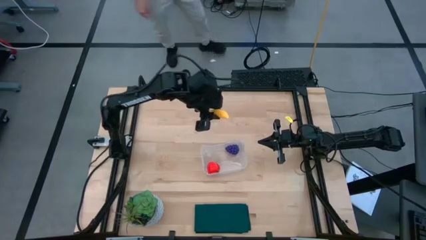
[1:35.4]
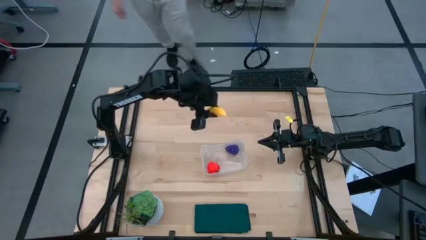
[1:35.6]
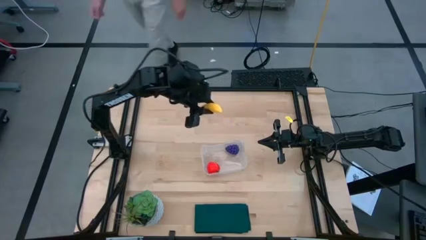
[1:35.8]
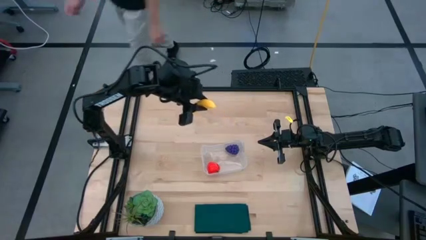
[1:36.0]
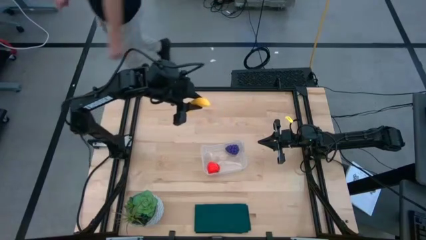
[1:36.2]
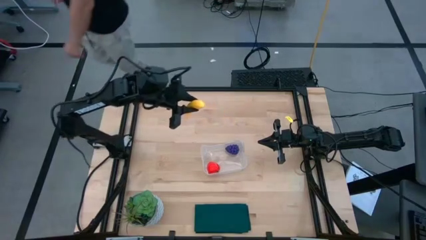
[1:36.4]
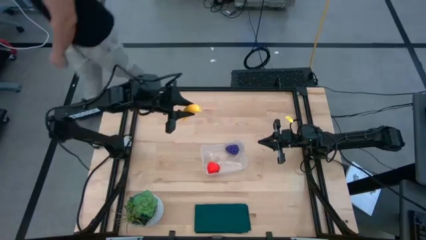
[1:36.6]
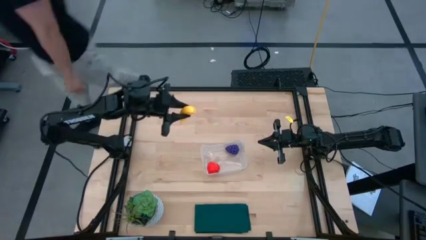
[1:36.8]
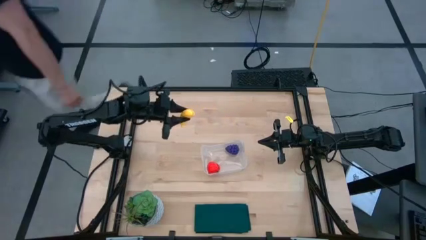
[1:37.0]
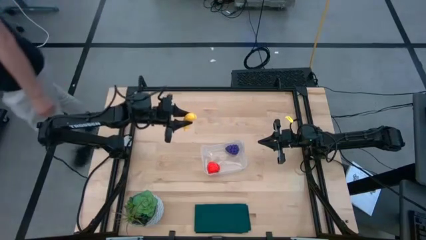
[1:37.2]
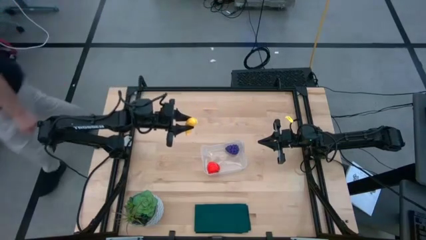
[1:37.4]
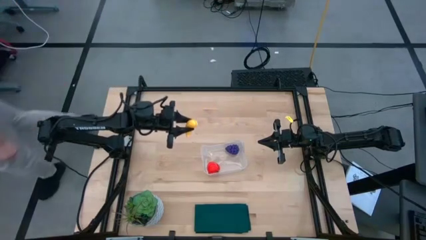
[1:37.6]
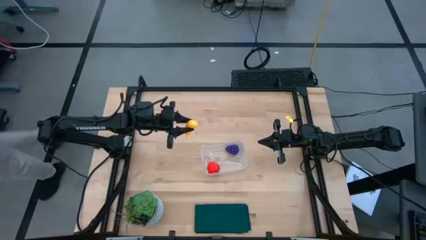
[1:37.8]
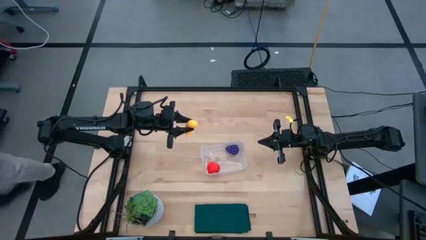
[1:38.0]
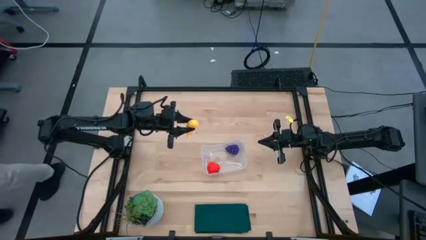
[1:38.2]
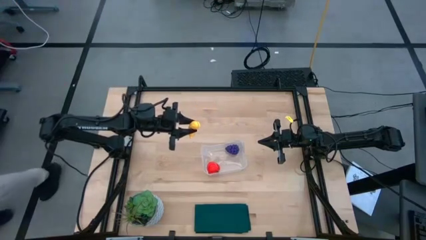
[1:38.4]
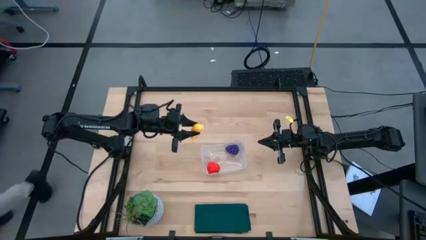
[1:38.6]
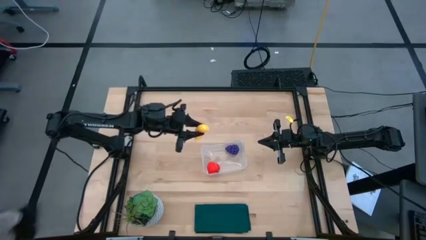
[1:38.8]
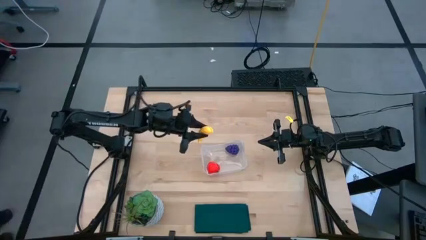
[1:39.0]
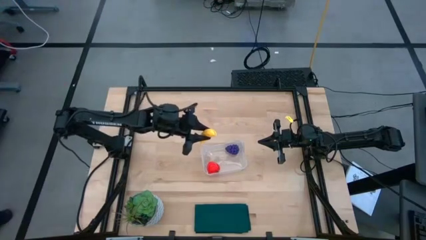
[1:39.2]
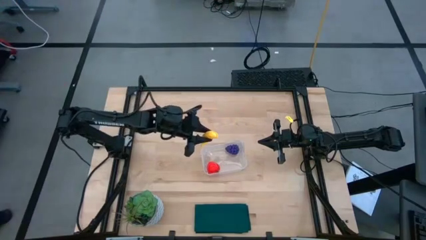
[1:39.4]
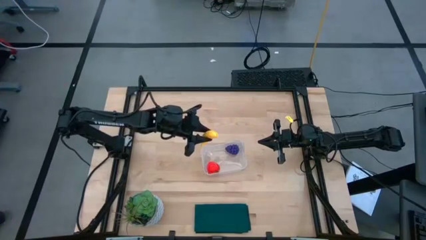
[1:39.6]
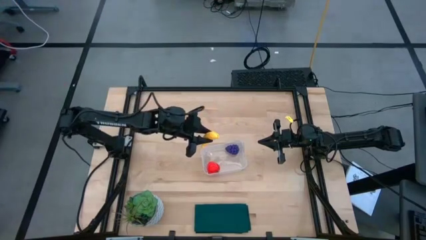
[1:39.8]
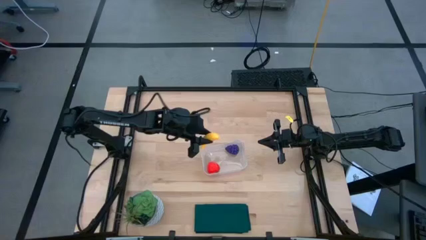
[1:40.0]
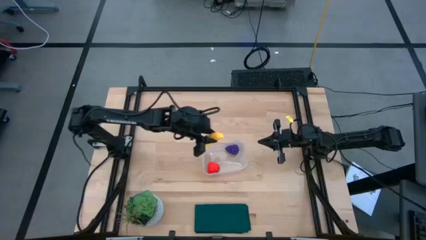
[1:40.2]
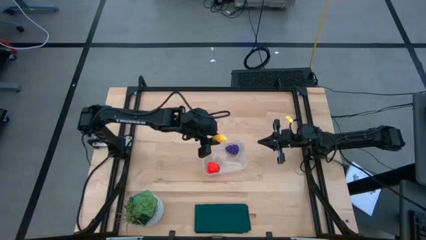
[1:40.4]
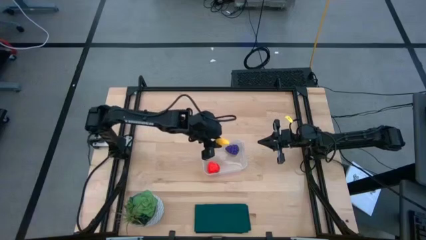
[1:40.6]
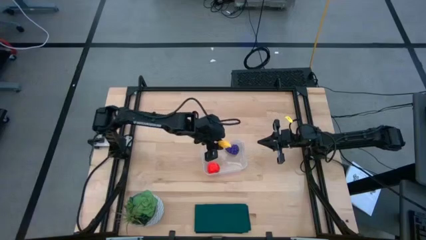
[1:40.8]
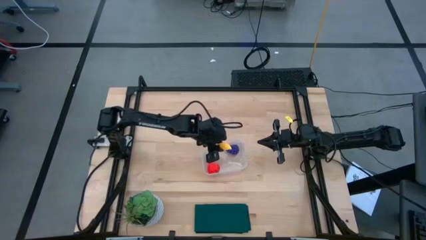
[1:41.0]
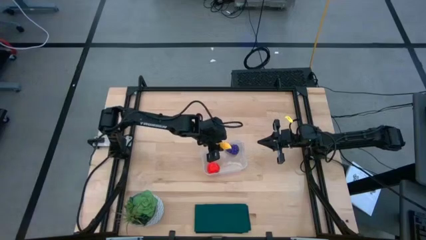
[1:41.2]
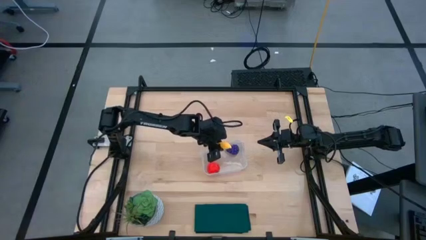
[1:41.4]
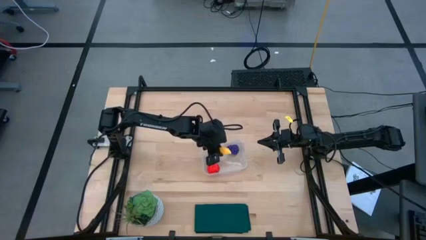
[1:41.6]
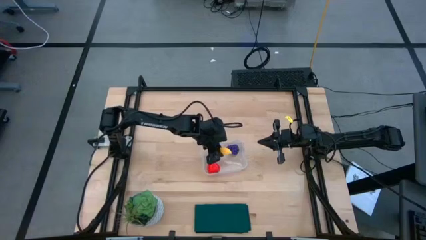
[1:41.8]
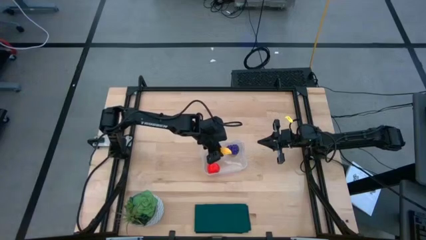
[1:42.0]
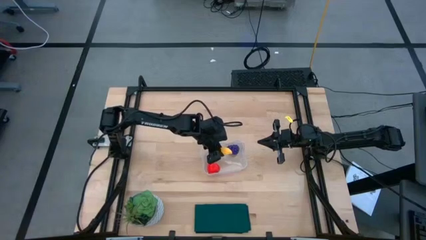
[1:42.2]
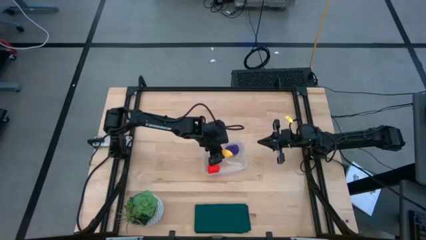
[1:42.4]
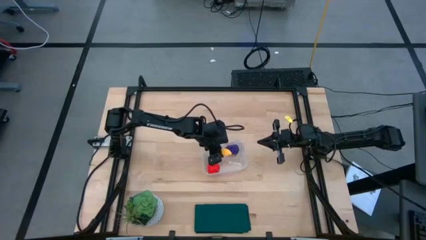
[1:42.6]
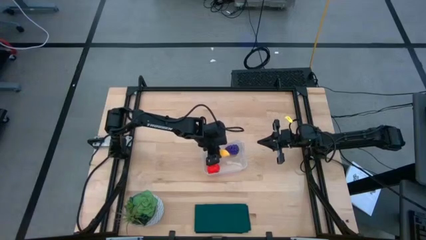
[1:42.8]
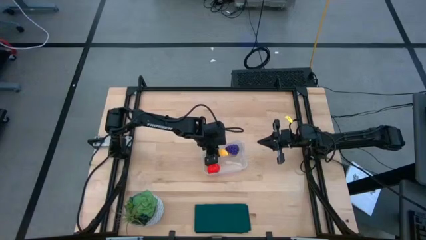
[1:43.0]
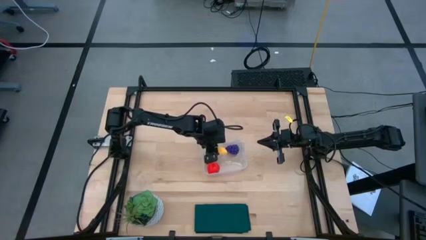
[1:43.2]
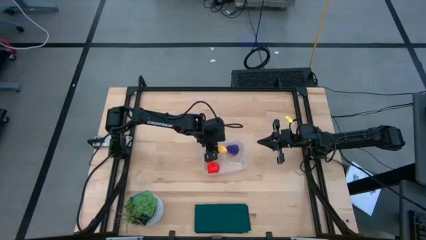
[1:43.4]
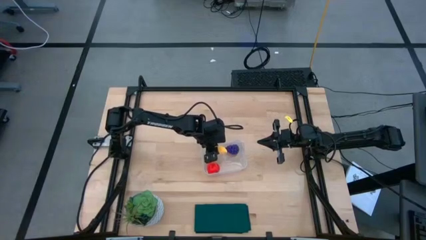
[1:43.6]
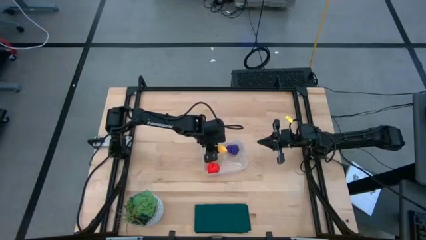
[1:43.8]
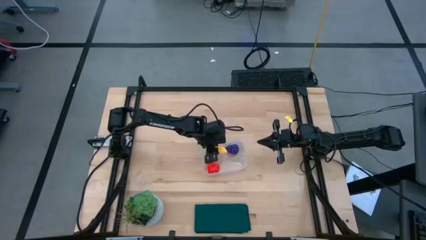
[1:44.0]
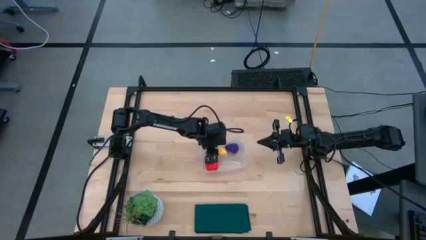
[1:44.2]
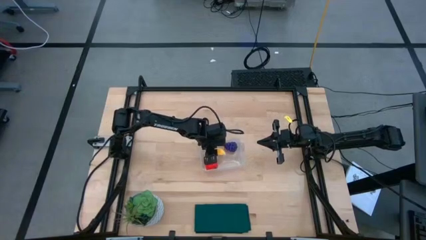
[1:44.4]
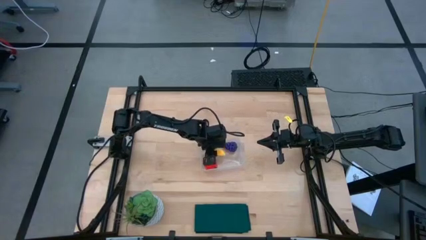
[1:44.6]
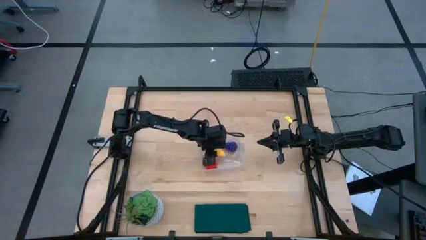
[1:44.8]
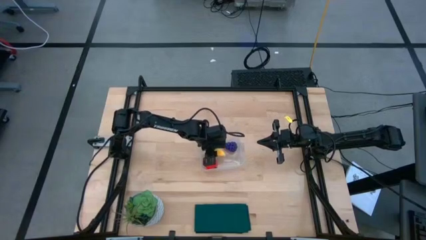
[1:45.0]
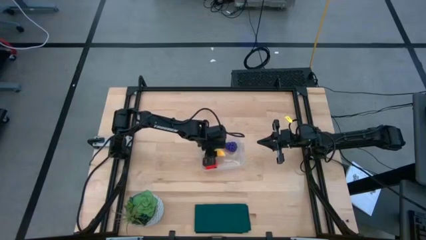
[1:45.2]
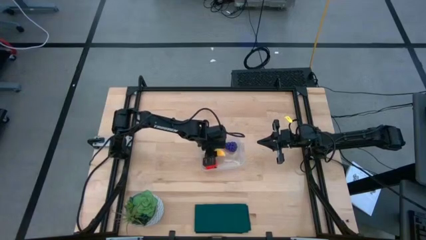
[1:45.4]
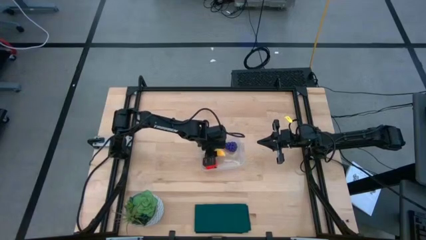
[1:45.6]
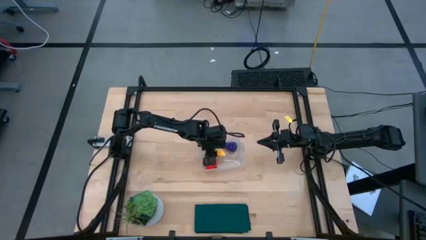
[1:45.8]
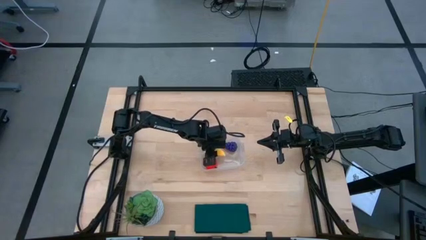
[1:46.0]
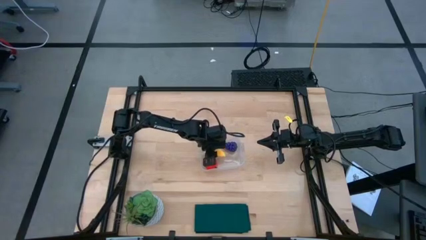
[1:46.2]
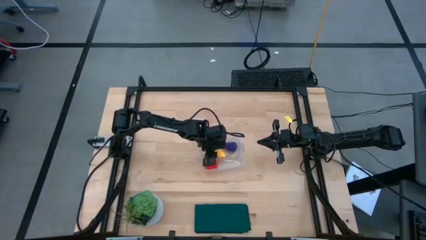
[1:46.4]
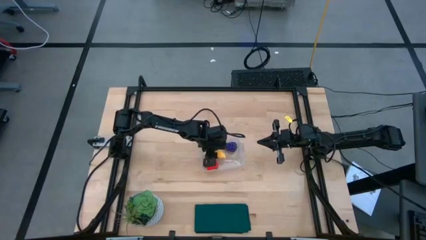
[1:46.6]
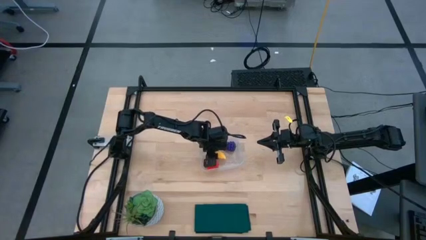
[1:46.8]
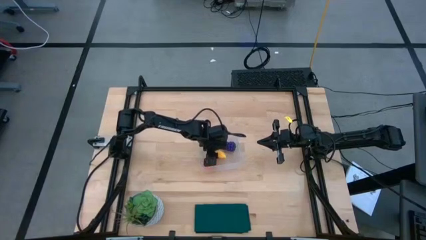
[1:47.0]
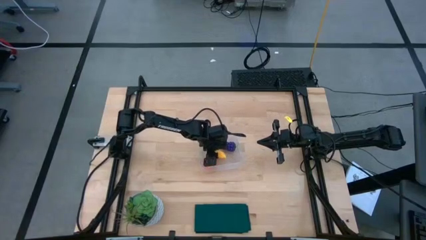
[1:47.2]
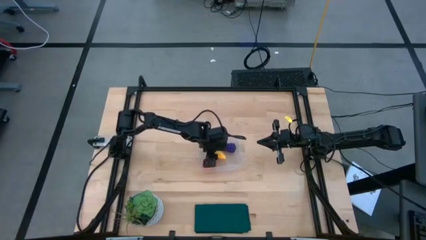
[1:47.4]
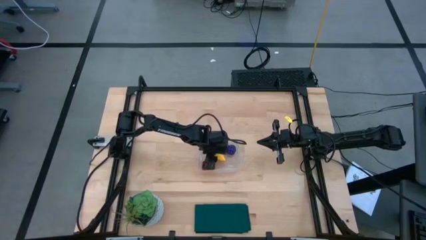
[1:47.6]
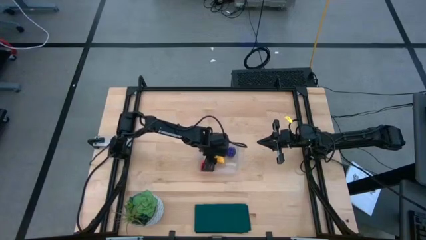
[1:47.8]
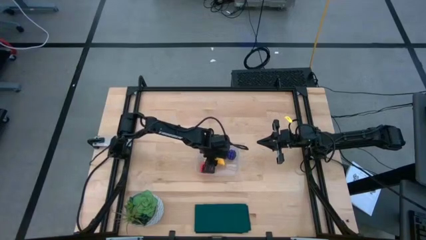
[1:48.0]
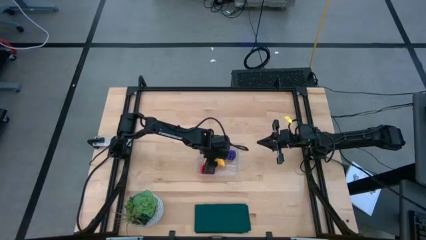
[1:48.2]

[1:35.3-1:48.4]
Task: Pick and placing Produce into tupperware
Put the banana into the transparent bin
